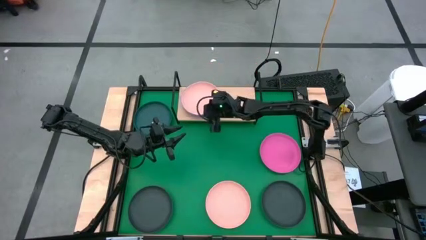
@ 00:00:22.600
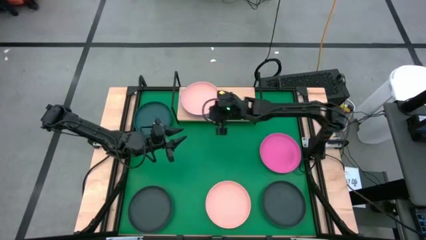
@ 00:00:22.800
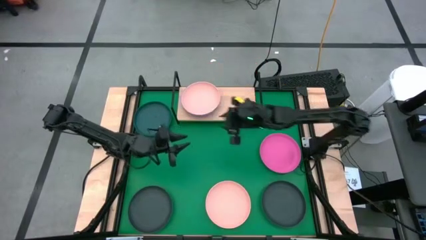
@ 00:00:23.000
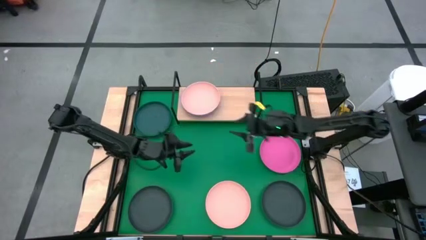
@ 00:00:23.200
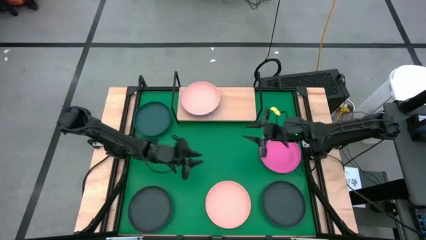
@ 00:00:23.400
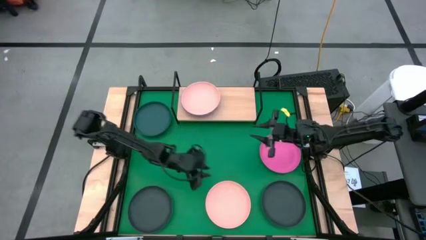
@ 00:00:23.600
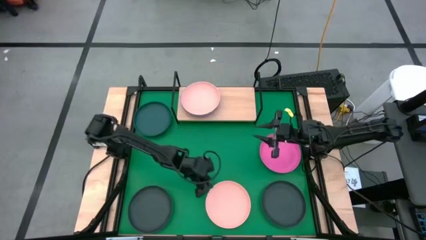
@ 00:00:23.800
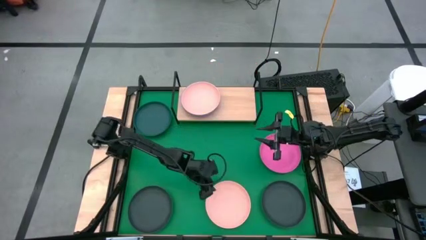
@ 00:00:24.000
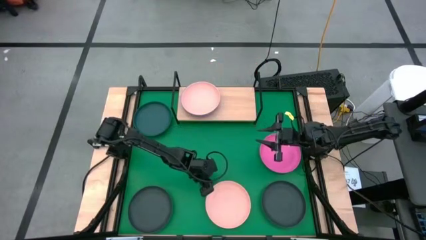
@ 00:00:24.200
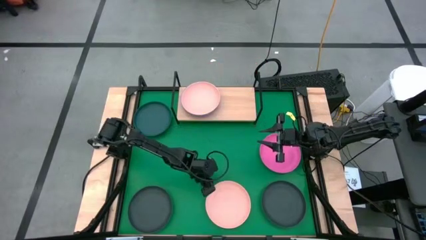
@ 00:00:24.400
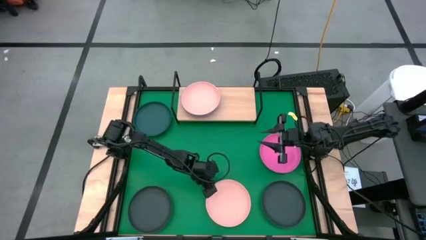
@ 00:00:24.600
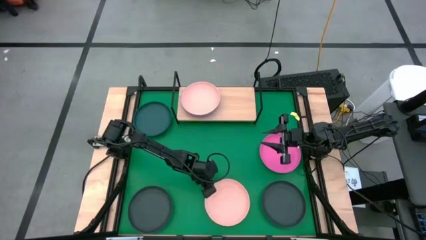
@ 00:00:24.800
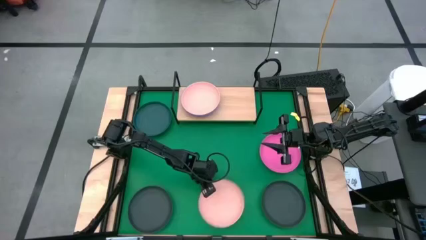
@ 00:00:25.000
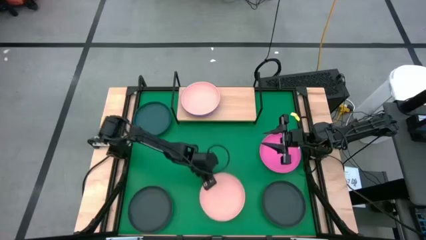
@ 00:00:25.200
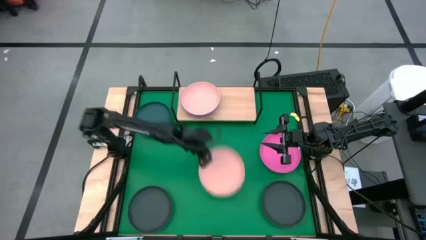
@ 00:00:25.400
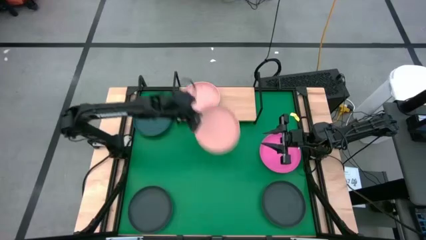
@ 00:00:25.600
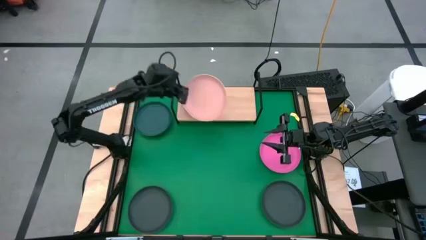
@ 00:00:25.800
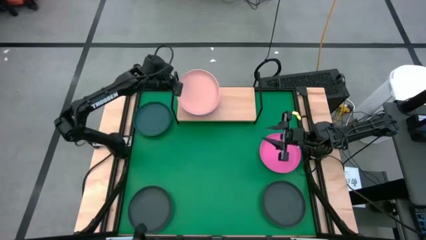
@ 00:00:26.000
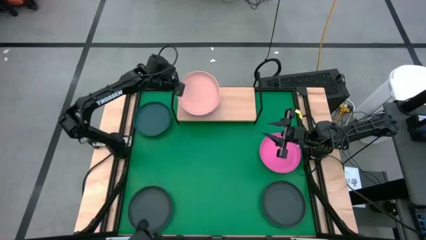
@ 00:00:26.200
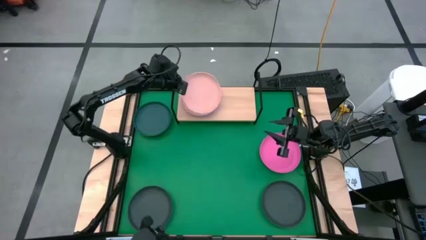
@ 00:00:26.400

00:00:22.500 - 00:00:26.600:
Task: Place and stack plates onto a shelf
Stack the light orange plate on top of the light orange plate on the shelf

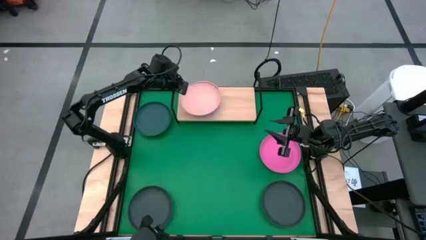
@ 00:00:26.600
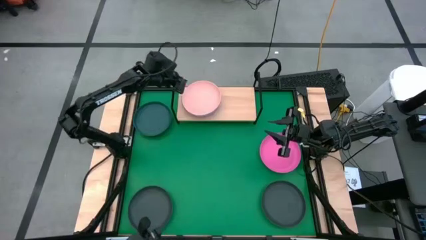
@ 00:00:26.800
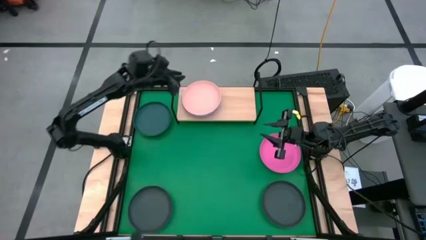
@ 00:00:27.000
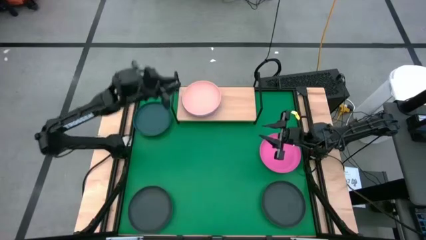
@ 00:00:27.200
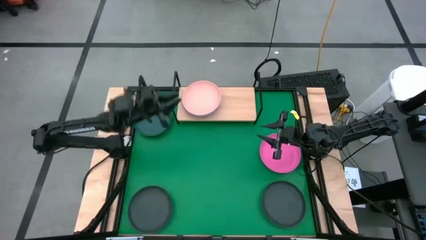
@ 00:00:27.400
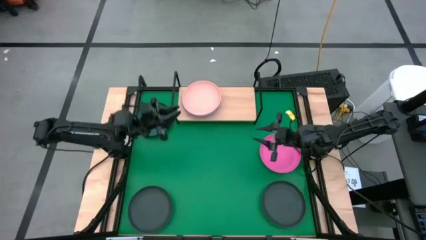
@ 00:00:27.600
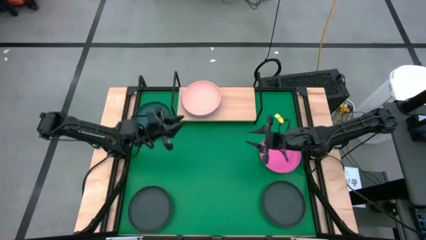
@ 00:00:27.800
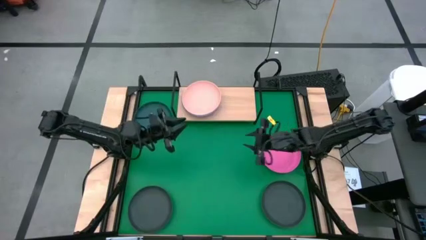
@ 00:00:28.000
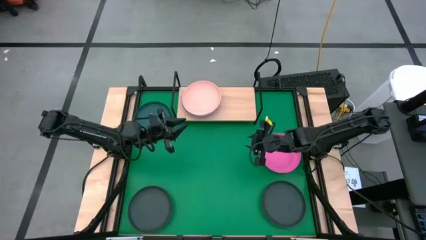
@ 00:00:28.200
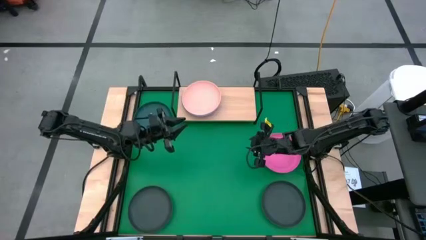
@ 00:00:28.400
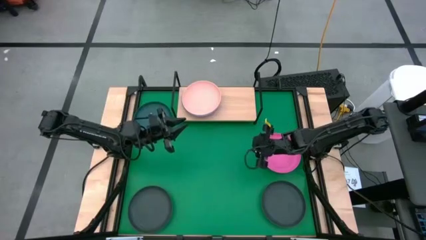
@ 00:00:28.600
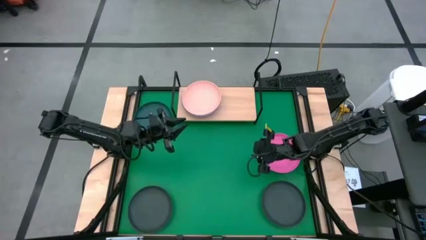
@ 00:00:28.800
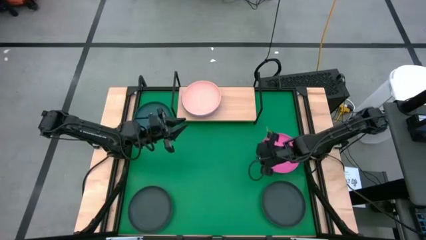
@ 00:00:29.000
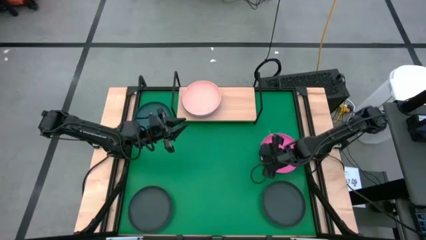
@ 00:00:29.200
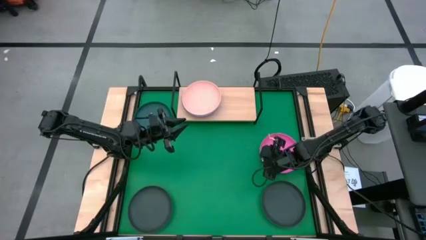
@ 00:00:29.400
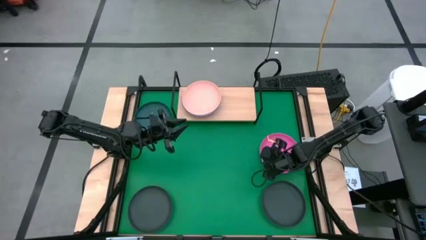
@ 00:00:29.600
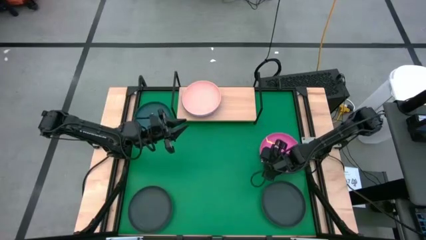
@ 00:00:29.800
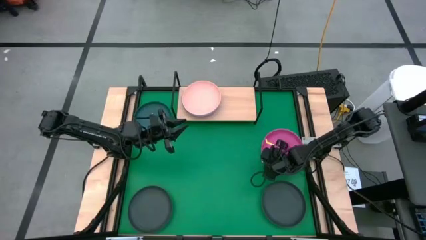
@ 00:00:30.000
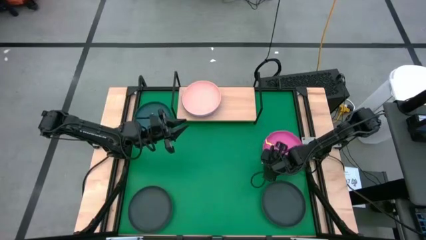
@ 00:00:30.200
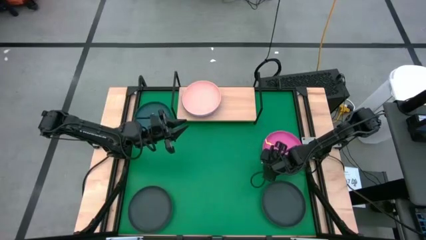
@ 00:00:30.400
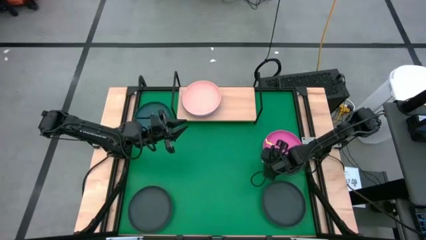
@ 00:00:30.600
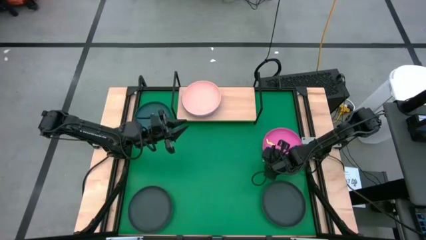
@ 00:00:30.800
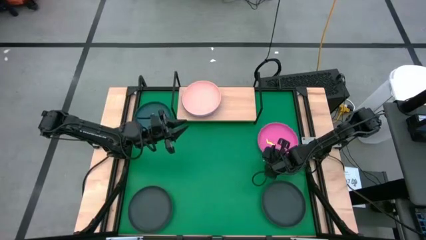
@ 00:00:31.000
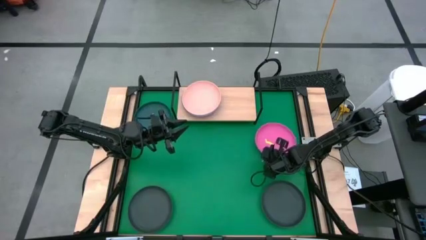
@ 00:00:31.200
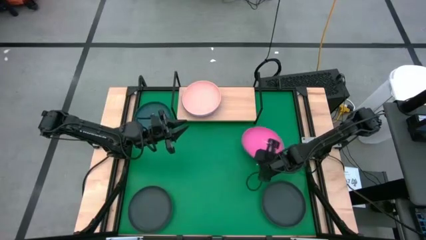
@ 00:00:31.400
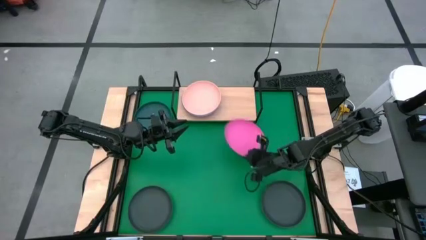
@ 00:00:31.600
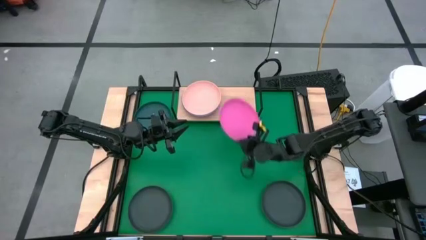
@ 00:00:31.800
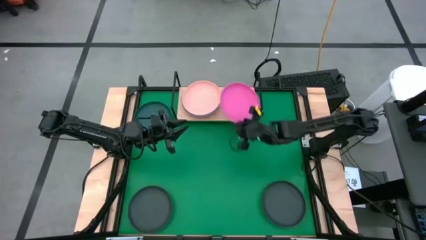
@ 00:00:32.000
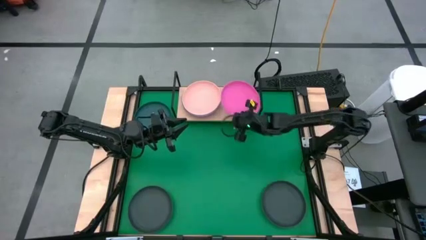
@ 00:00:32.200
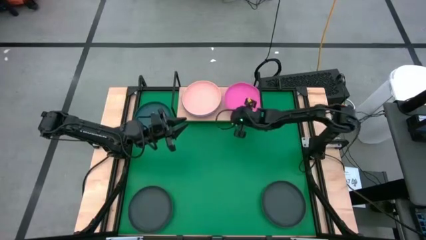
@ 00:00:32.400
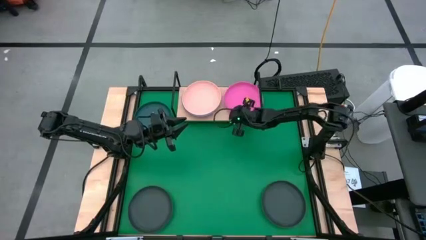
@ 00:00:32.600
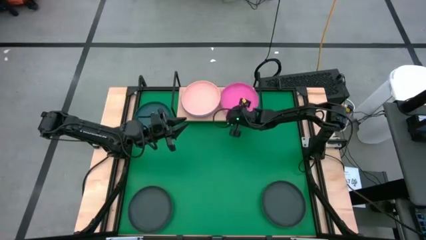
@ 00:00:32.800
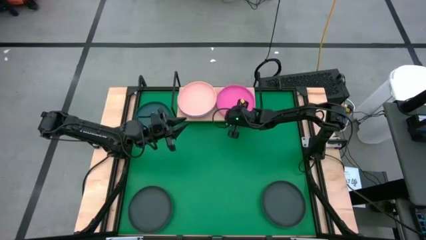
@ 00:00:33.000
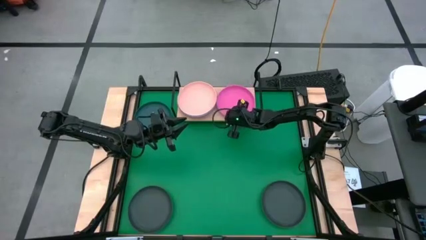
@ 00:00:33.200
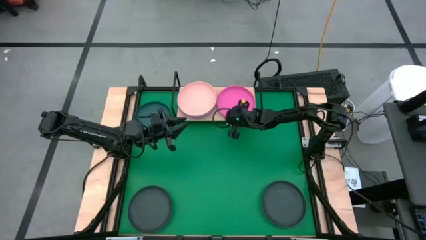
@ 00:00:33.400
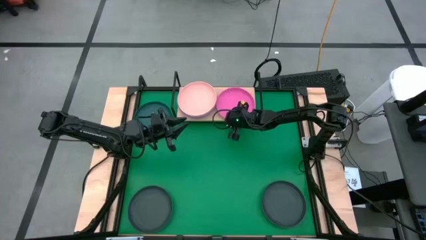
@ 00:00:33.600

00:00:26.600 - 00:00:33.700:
Put the pink plate on the shelf

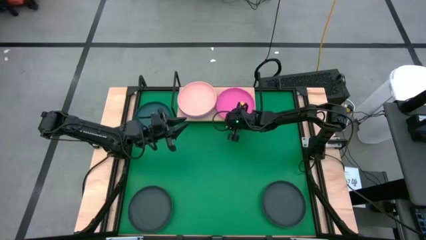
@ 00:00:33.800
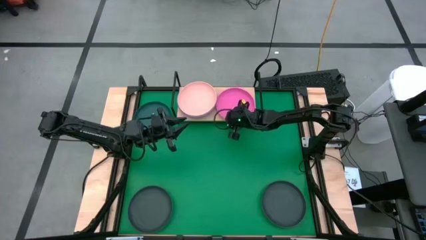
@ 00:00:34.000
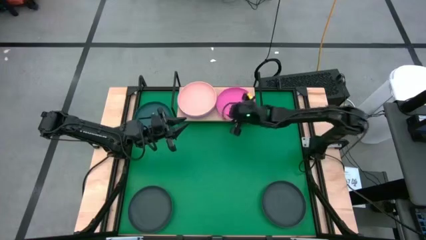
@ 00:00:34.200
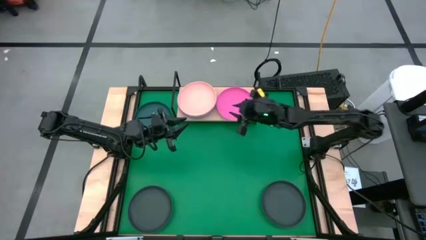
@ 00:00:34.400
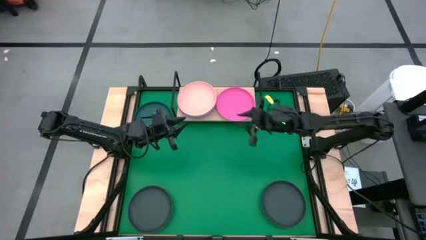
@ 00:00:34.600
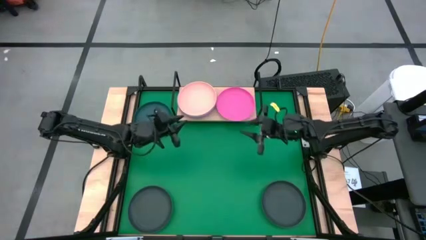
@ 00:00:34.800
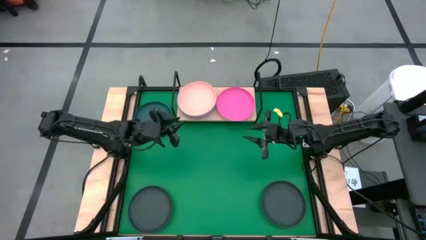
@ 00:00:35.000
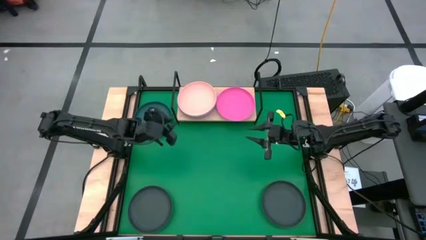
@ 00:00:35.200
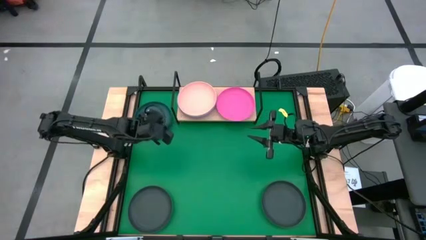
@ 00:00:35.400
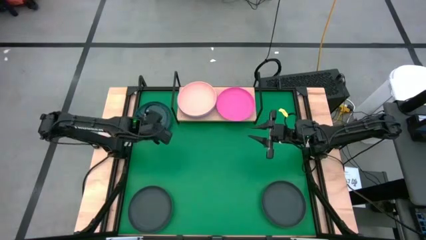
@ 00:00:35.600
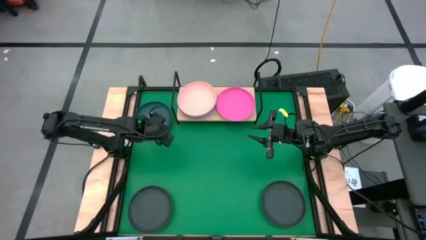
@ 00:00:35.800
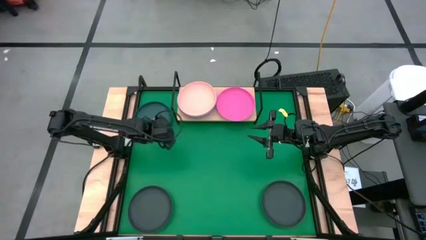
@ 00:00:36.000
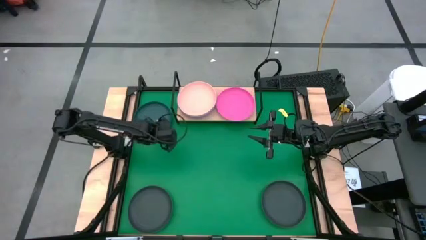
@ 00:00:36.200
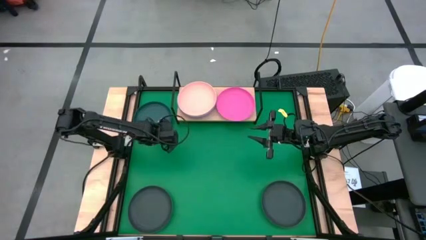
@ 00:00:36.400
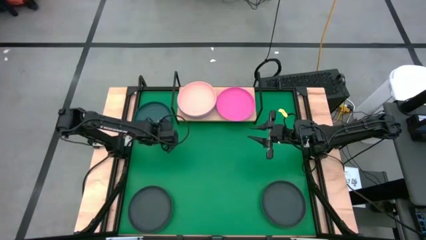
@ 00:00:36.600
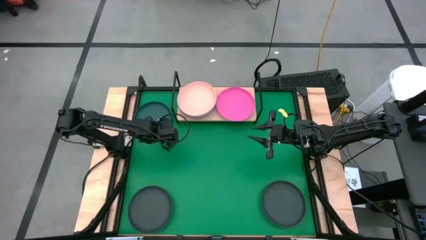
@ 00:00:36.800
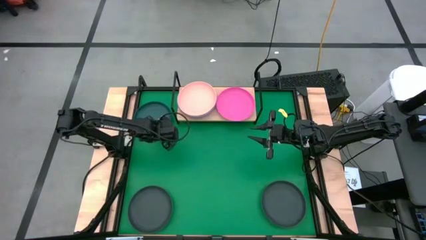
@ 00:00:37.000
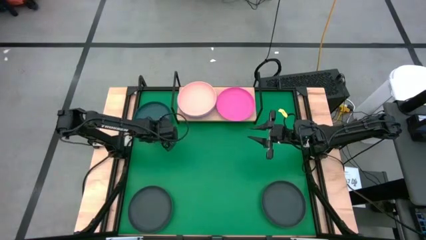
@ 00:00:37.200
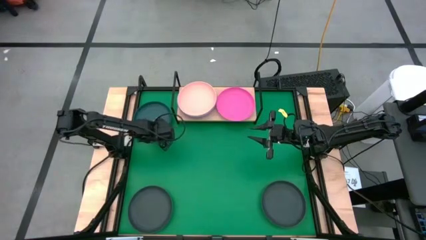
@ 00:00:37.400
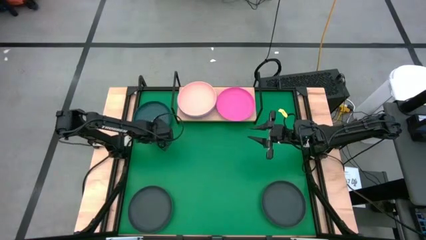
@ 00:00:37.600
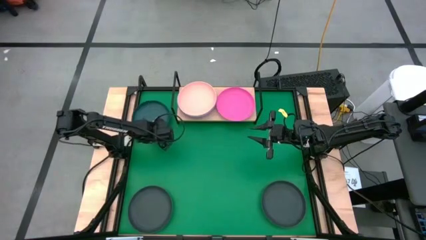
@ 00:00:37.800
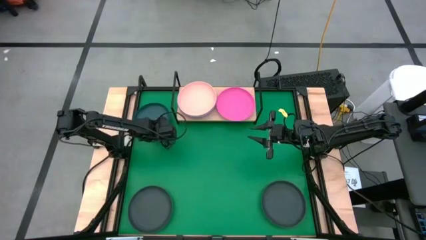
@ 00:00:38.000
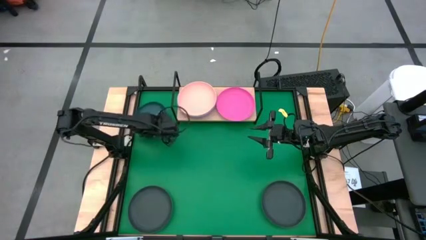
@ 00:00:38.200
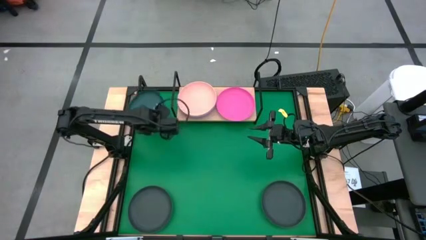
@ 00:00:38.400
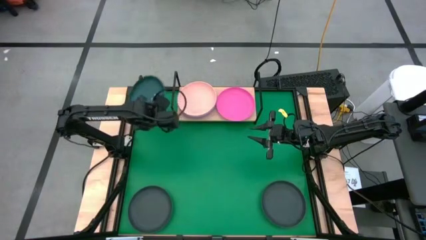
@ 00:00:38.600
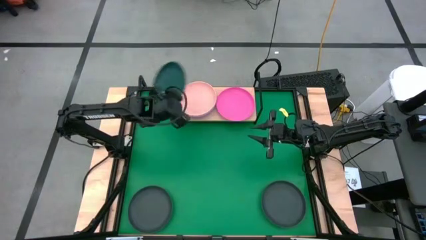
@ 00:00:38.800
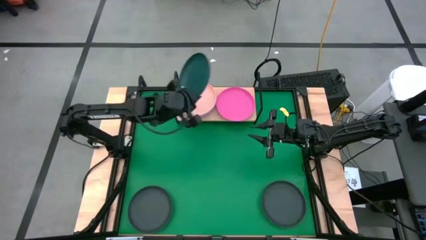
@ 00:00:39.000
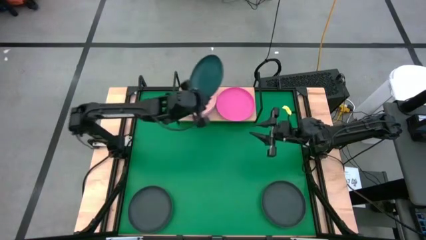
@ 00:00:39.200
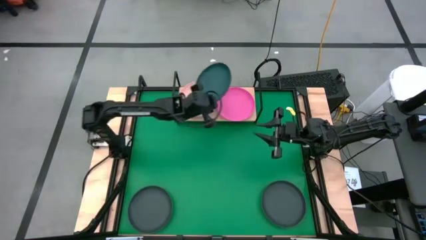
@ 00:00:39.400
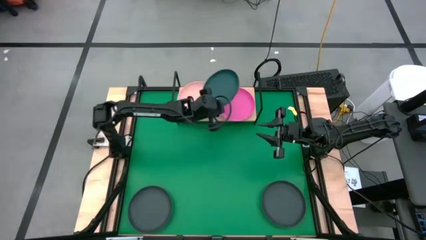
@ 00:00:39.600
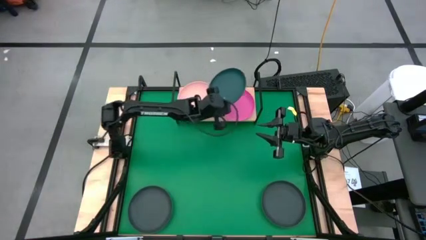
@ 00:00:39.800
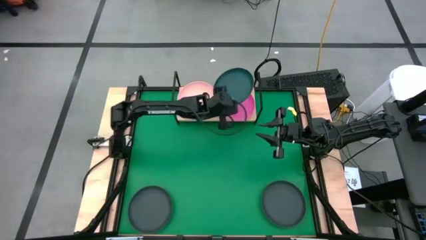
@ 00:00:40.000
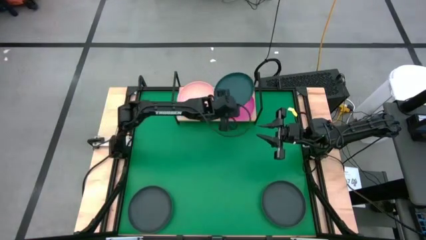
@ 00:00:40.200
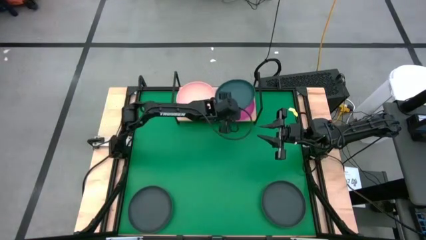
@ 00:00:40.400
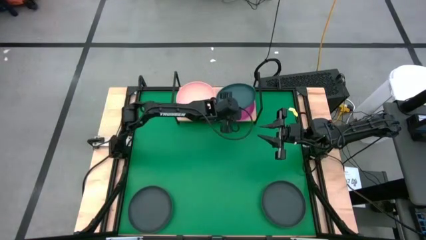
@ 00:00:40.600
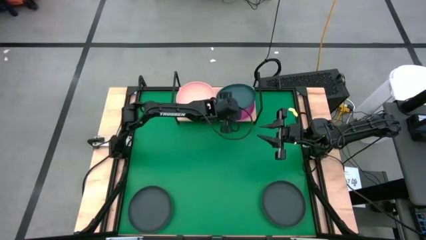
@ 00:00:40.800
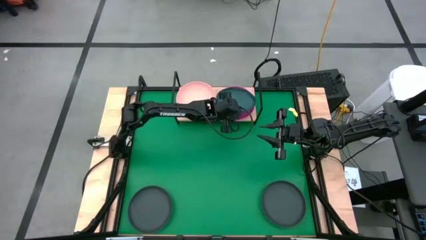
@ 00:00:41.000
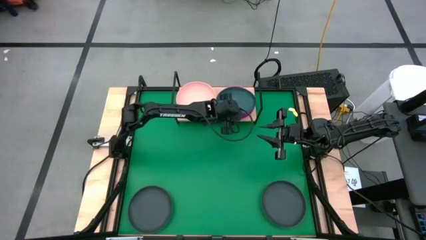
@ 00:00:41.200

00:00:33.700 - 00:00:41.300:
Stack the dark green plate on top of the pink plate on the shelf
